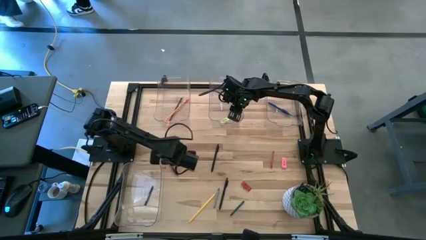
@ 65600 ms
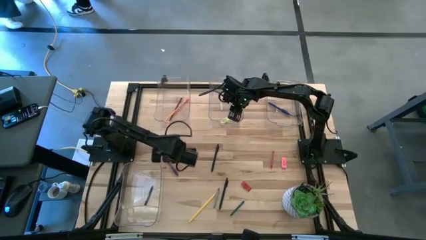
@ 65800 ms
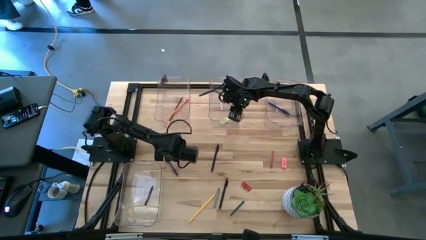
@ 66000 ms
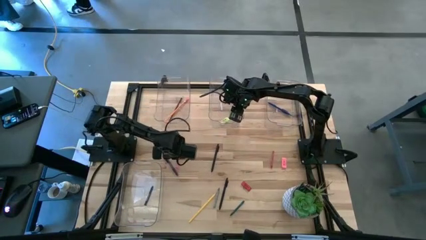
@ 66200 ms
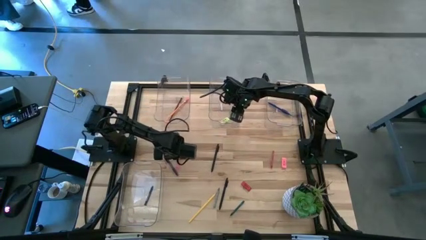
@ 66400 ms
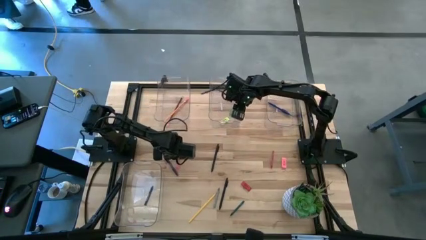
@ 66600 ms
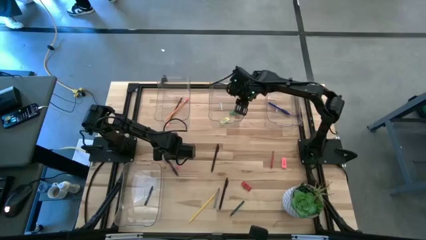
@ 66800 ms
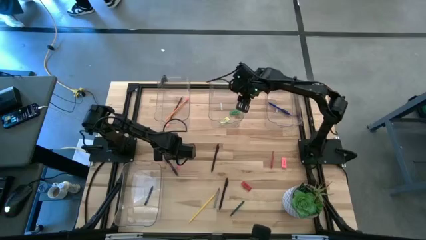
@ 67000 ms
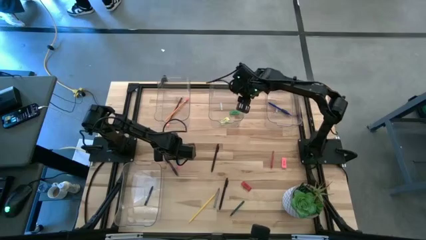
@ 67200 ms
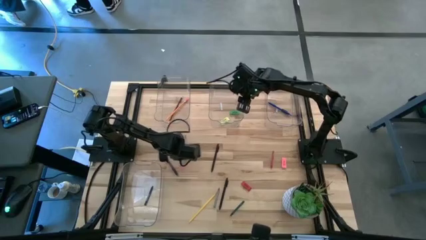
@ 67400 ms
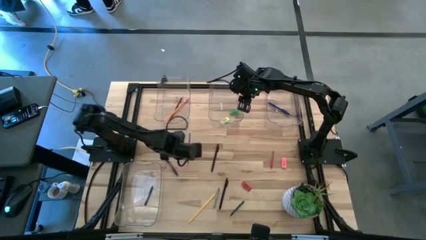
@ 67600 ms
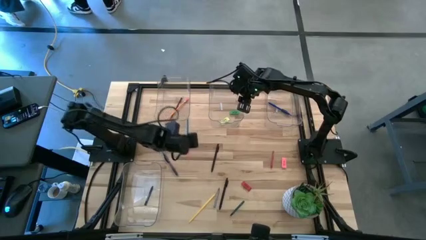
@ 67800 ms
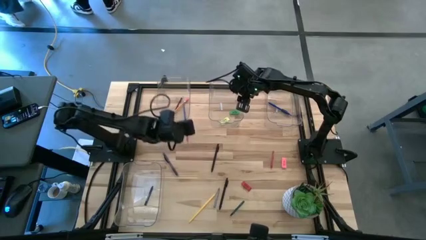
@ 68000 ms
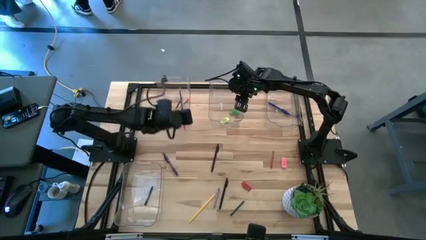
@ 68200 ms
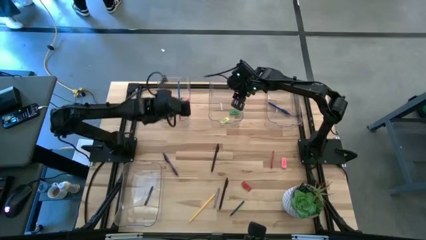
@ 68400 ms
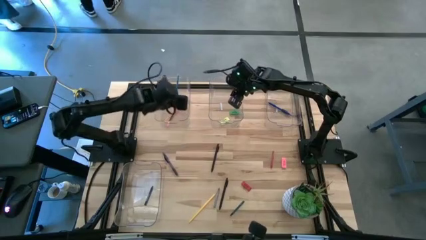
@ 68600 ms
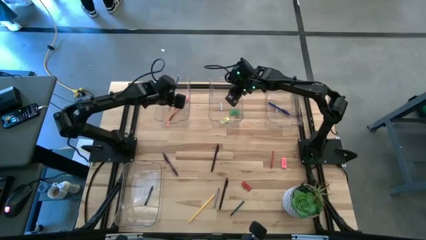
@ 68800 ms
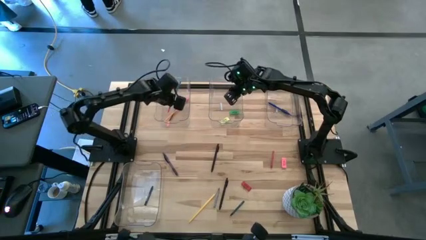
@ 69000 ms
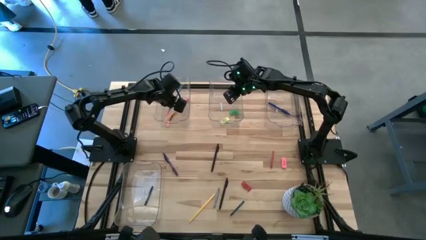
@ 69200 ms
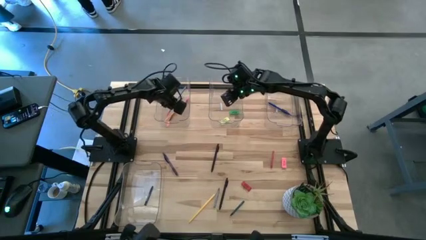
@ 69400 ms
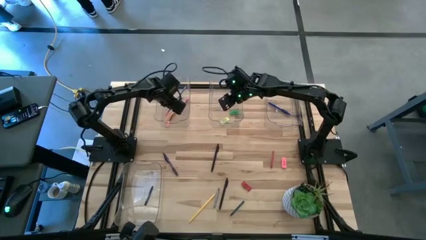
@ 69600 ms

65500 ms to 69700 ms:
Task: Sort crayons/erasers/pens/pencils in bins
Put the blue pencil into the top left transparent bin

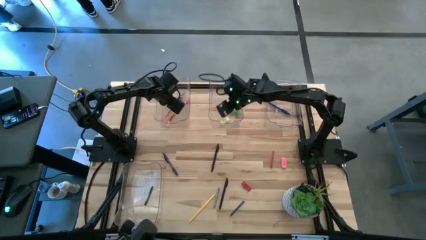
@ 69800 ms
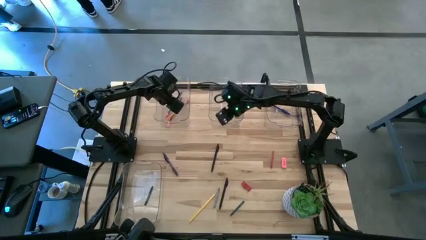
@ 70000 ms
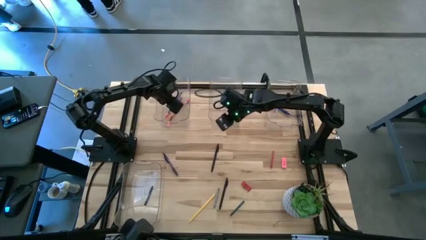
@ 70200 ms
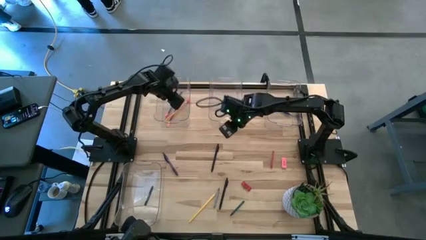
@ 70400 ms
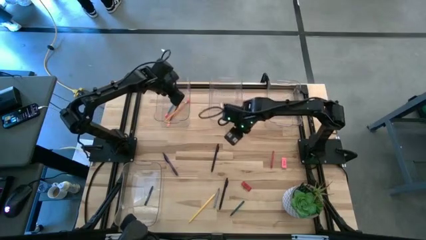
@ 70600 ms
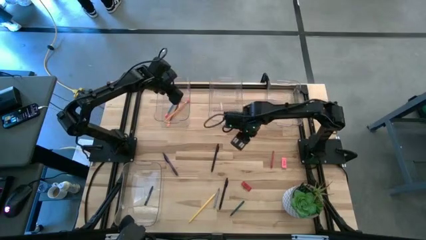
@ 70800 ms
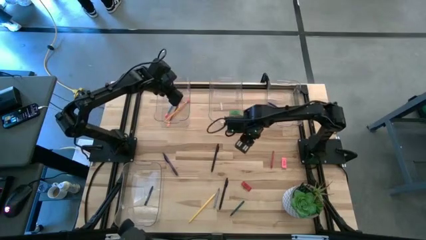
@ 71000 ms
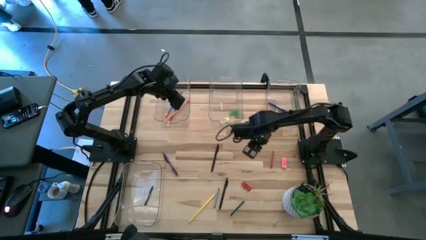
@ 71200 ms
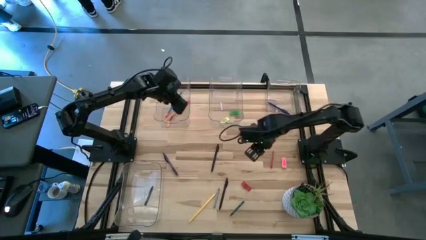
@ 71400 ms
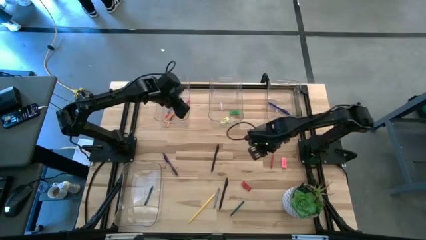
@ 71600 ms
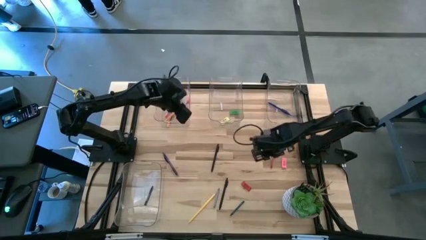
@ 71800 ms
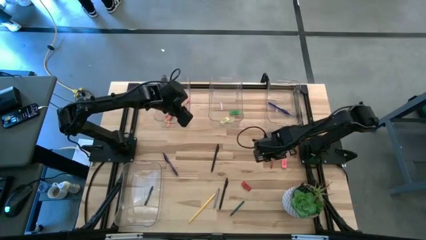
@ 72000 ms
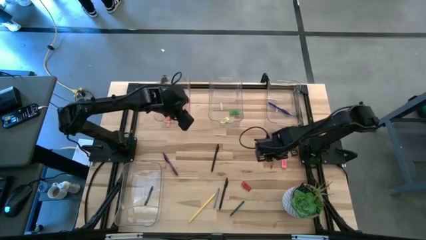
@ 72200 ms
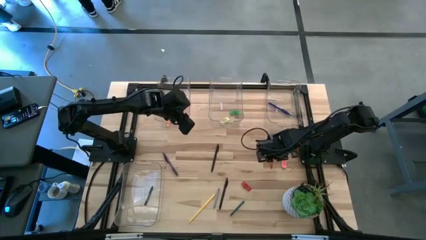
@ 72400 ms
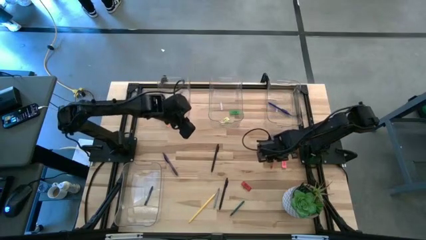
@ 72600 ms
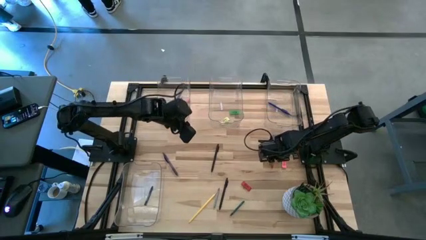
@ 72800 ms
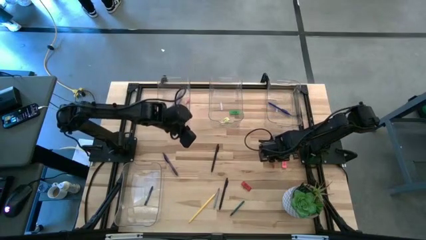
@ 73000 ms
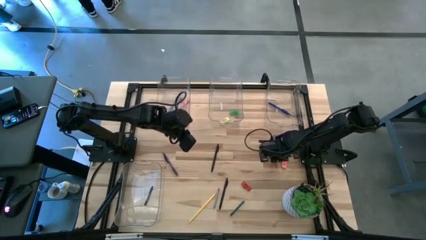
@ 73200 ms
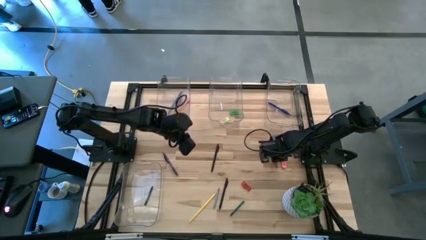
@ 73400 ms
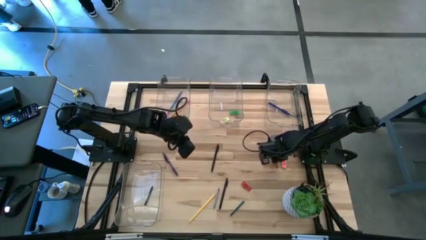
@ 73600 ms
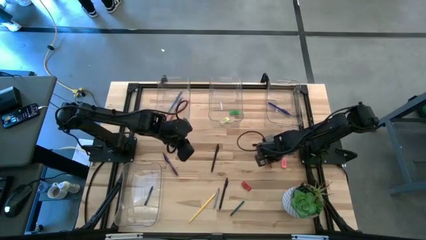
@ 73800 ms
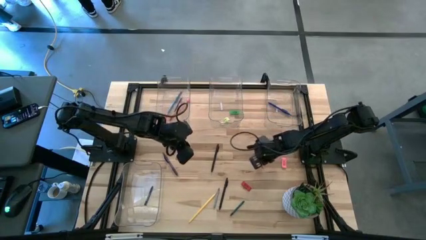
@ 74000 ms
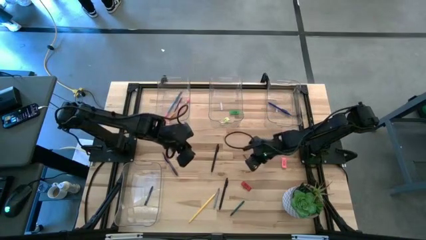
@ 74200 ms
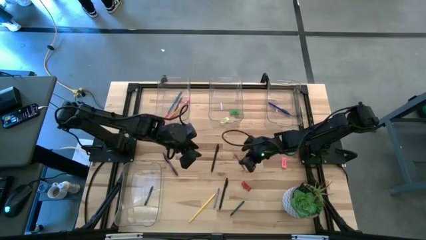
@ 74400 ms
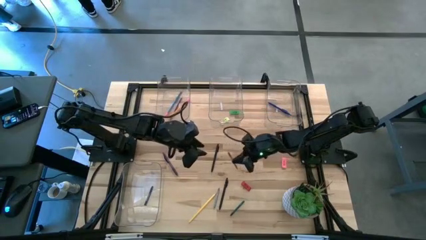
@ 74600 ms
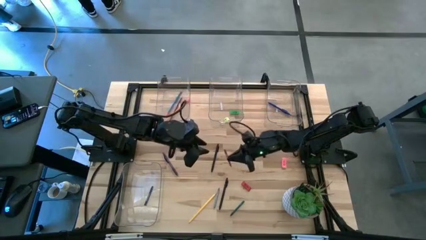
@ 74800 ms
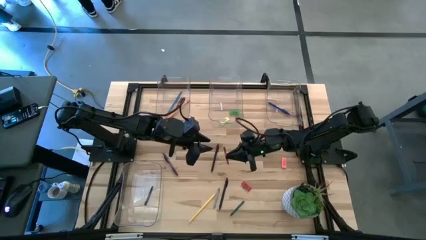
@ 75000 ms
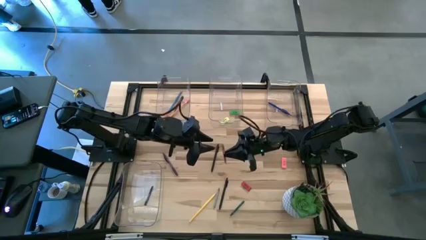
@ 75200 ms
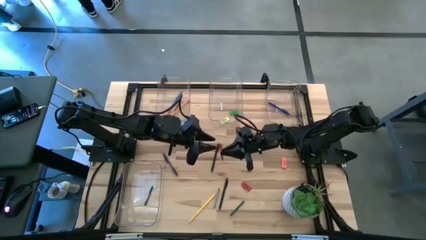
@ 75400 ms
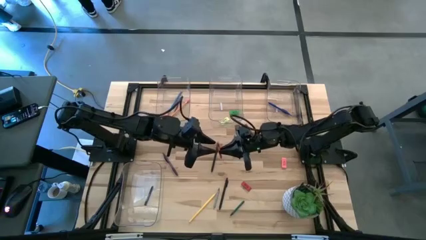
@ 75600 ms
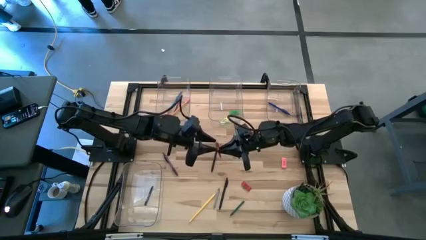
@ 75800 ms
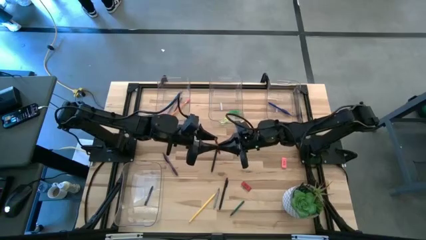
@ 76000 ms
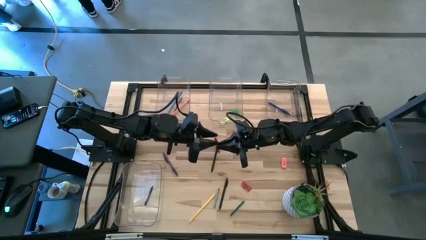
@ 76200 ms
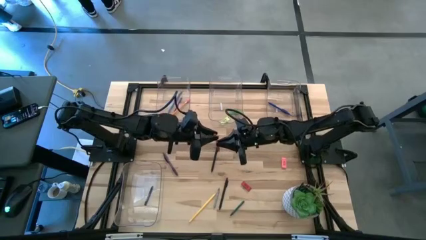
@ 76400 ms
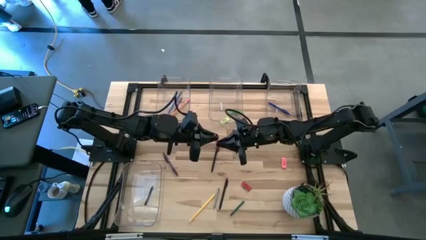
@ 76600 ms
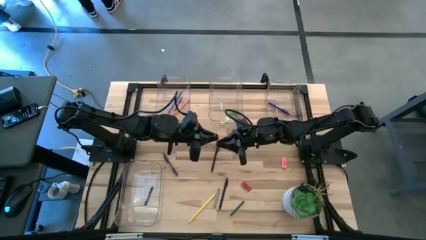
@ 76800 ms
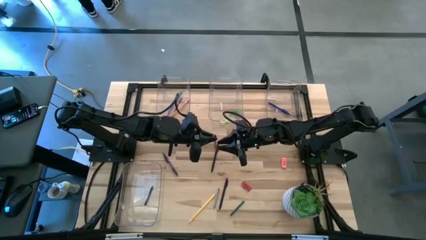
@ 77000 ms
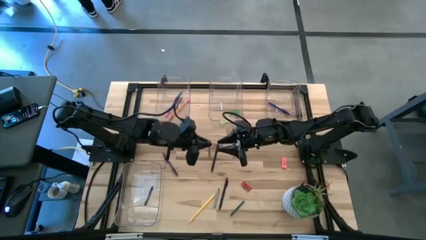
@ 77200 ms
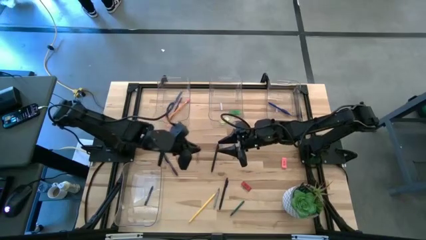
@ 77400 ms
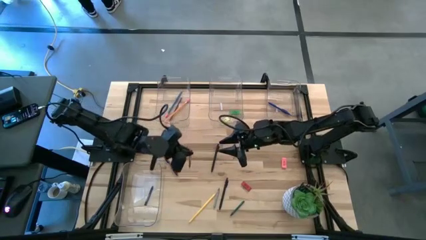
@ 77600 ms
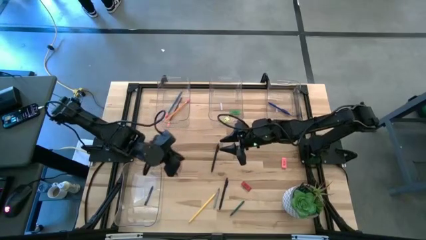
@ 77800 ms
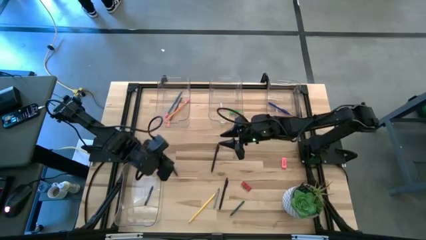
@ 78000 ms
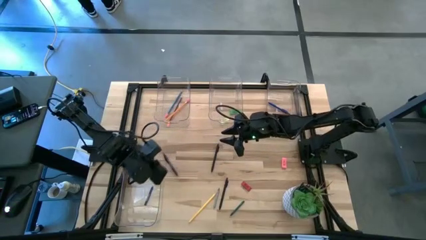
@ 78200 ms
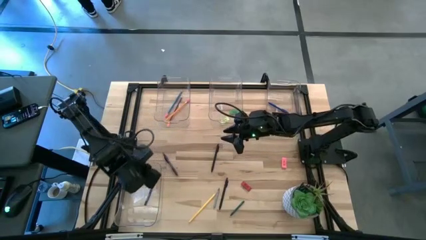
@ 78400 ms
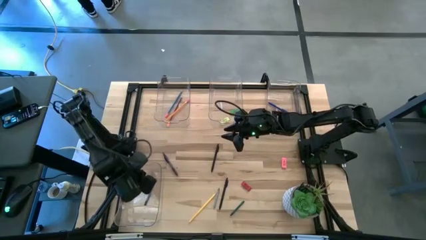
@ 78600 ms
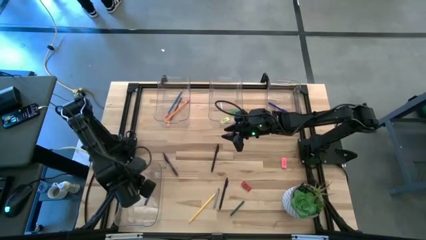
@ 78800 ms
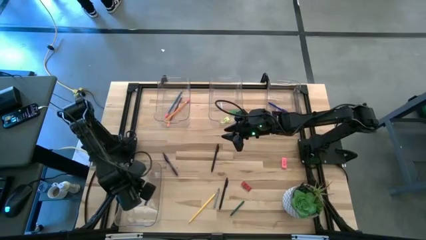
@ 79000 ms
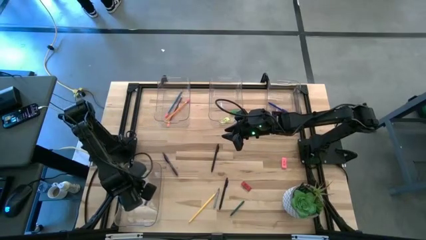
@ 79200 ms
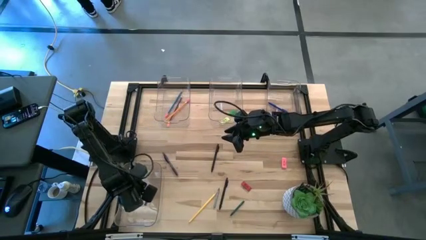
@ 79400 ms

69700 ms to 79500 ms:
Put the red crayon into the bottom transparent bin

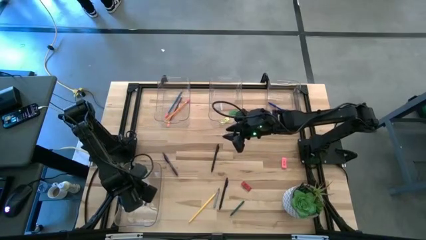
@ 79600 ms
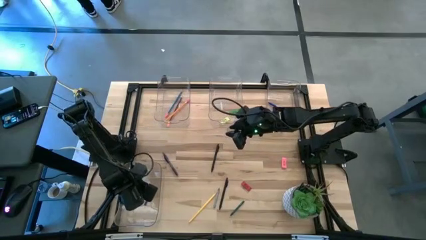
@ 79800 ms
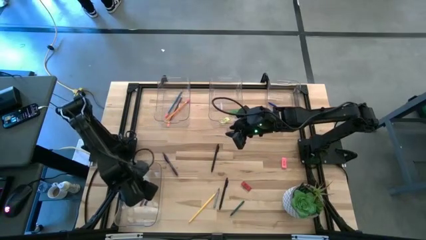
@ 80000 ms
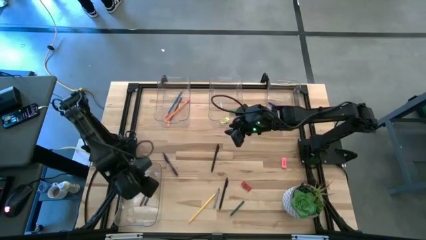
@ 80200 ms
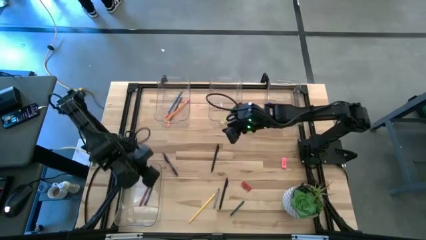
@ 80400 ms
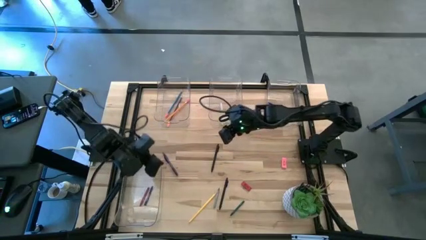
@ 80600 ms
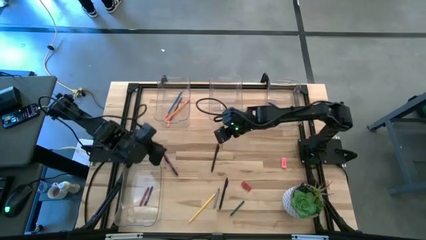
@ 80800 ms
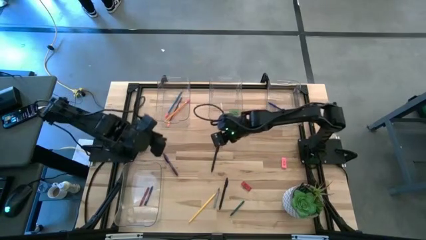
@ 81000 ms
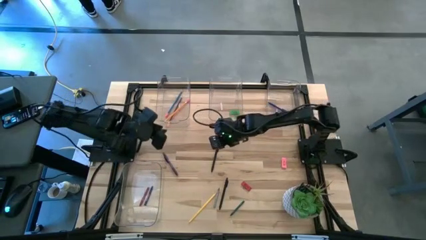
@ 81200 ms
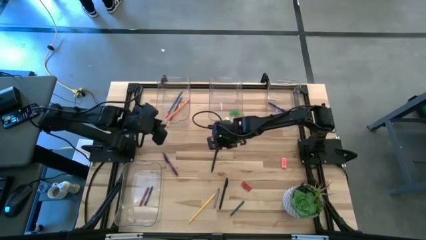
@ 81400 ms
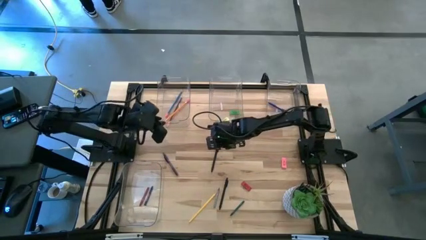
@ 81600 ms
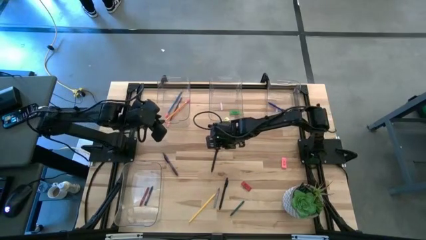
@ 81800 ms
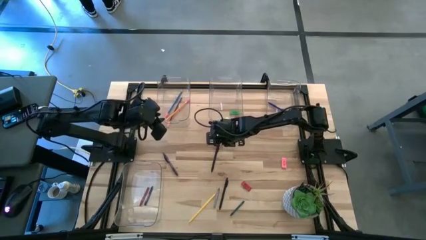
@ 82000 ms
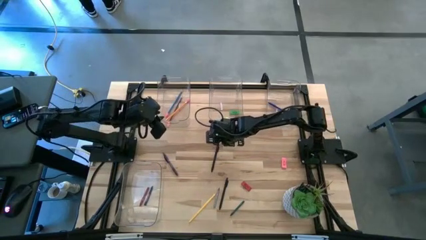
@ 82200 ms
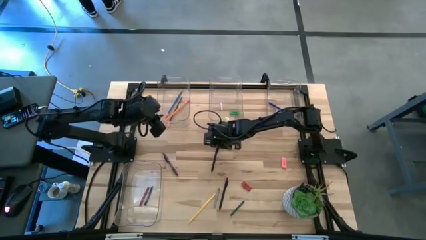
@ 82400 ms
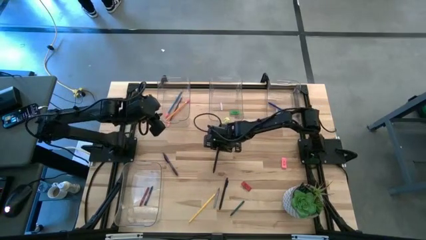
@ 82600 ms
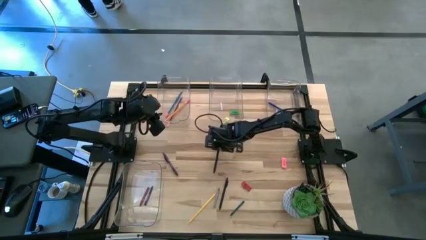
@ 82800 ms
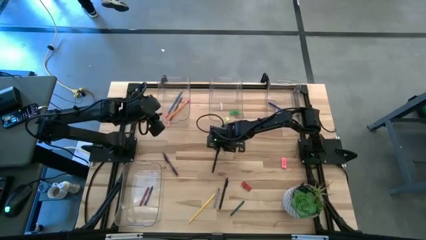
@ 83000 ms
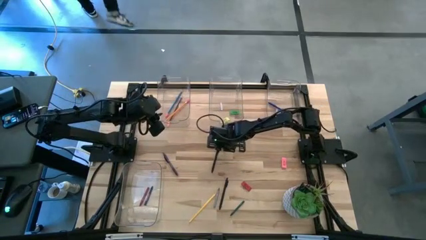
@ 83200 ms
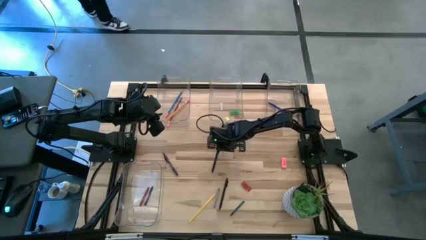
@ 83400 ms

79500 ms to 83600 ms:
Put the top black pen into the top right transparent bin
